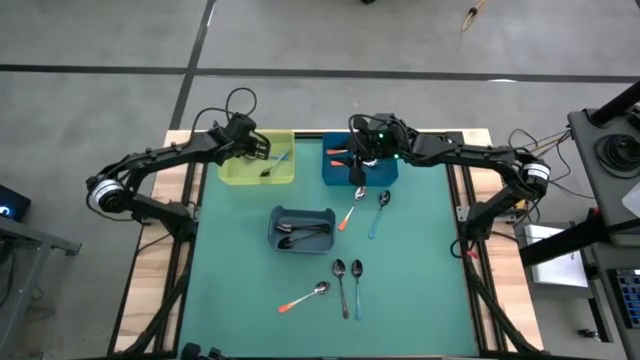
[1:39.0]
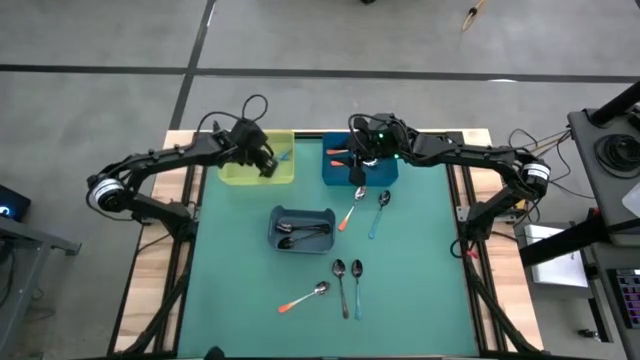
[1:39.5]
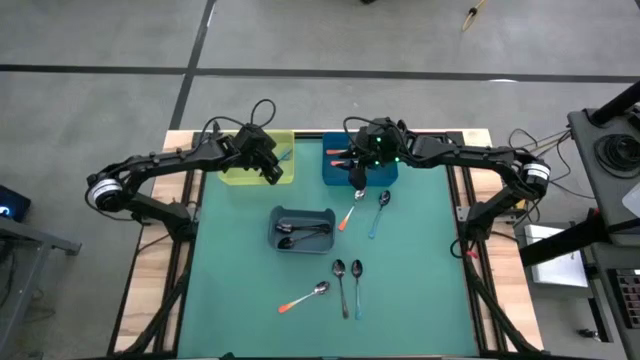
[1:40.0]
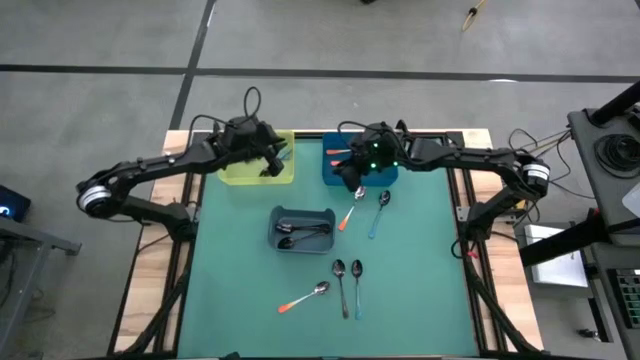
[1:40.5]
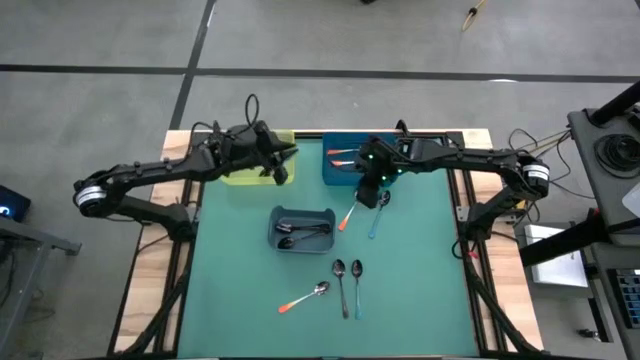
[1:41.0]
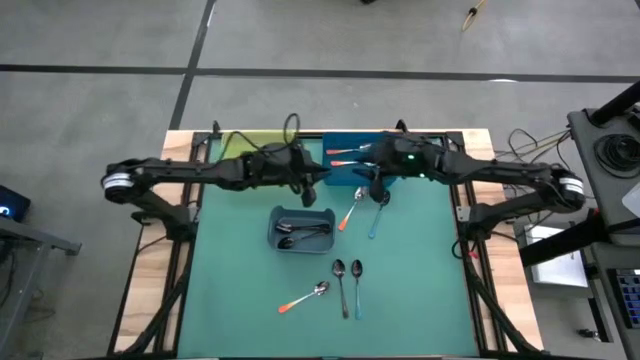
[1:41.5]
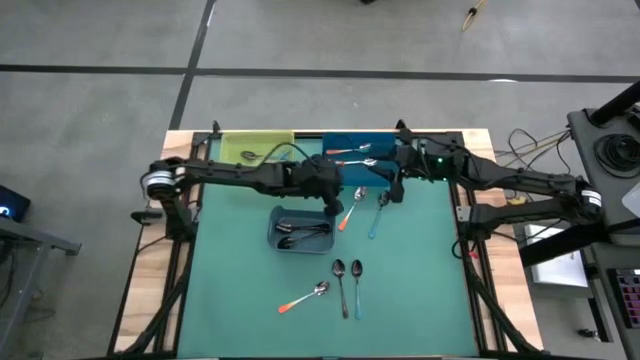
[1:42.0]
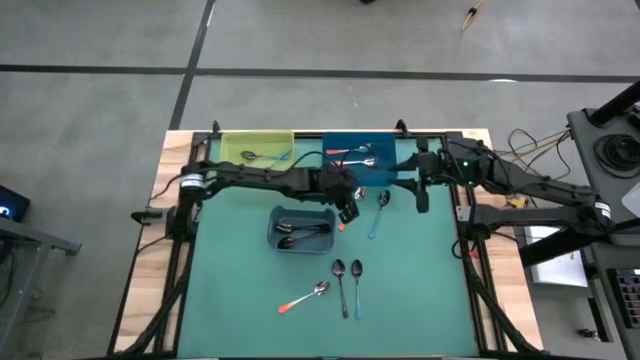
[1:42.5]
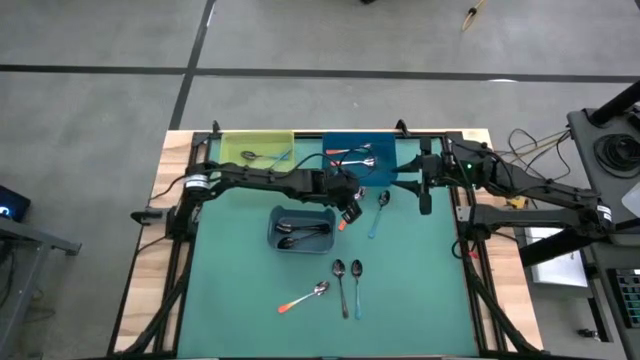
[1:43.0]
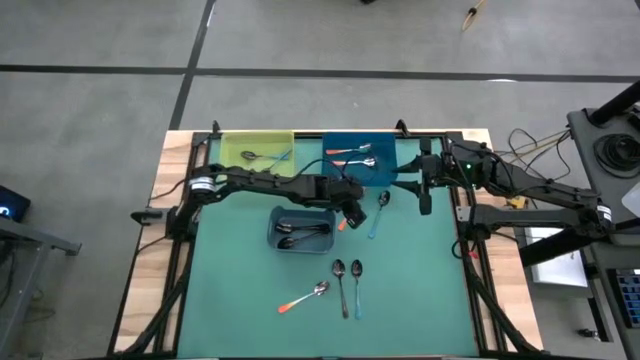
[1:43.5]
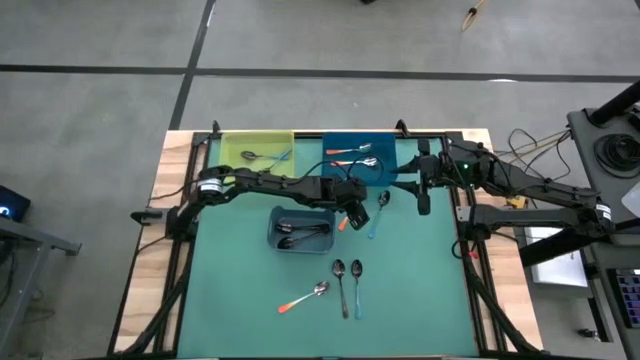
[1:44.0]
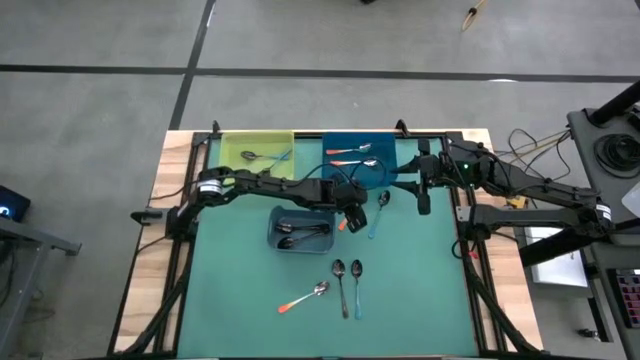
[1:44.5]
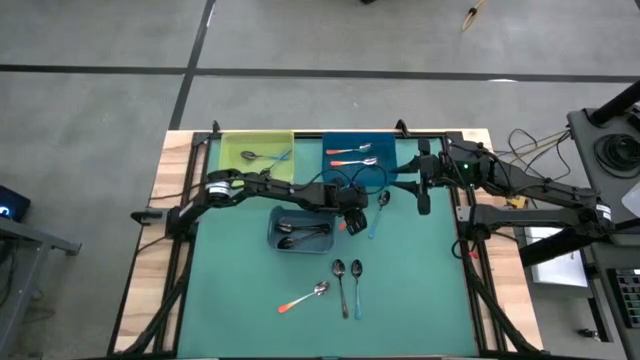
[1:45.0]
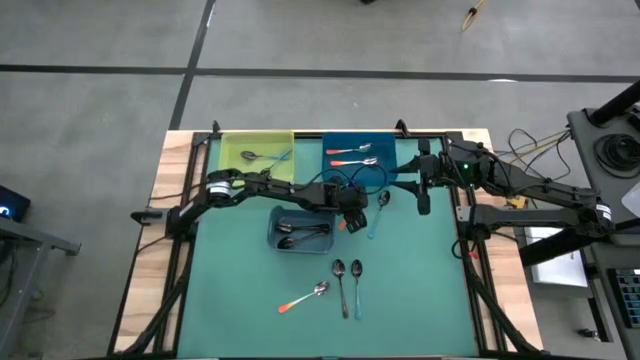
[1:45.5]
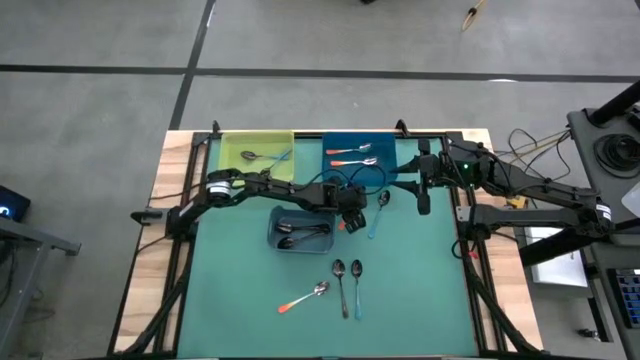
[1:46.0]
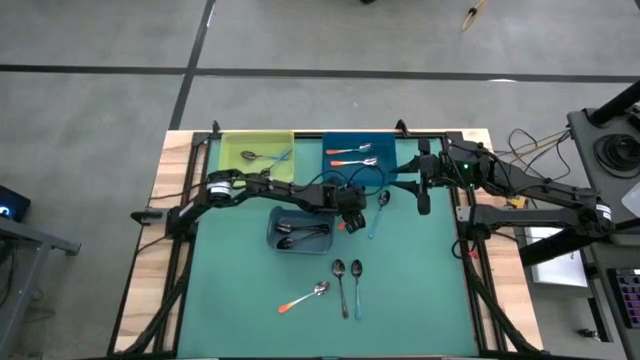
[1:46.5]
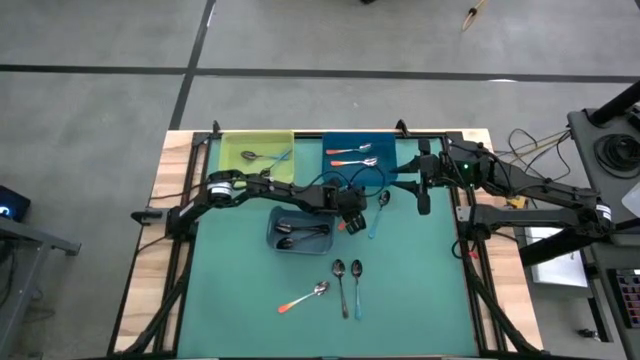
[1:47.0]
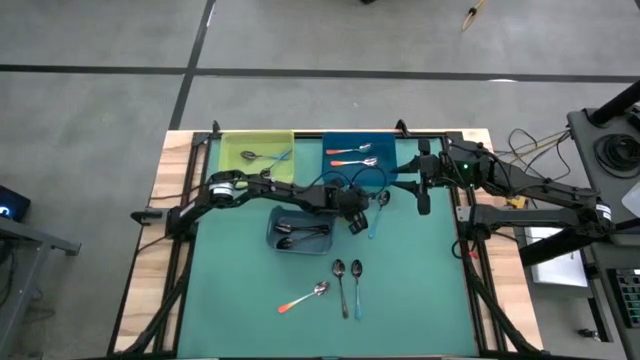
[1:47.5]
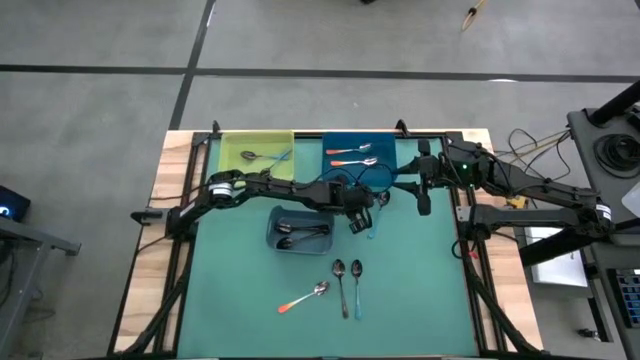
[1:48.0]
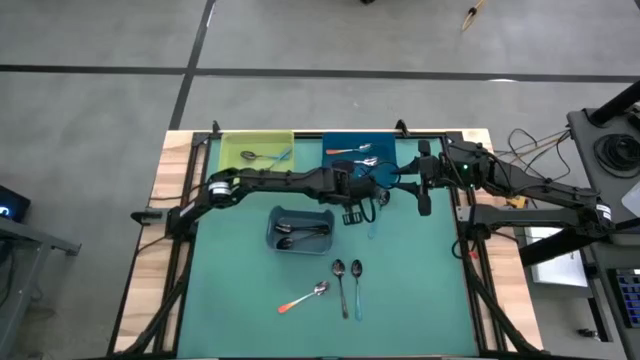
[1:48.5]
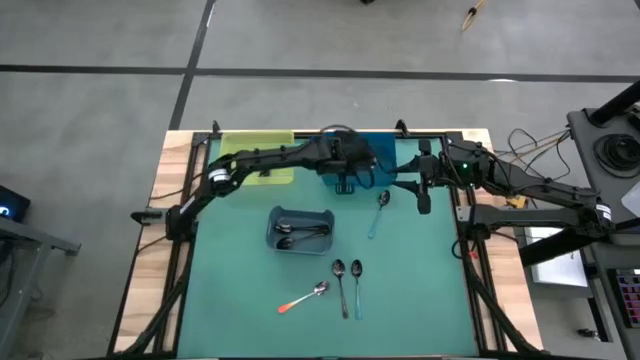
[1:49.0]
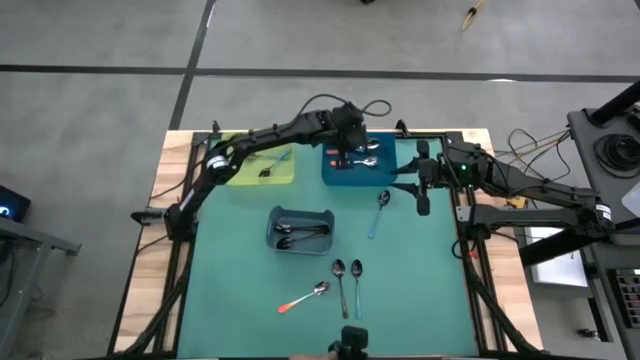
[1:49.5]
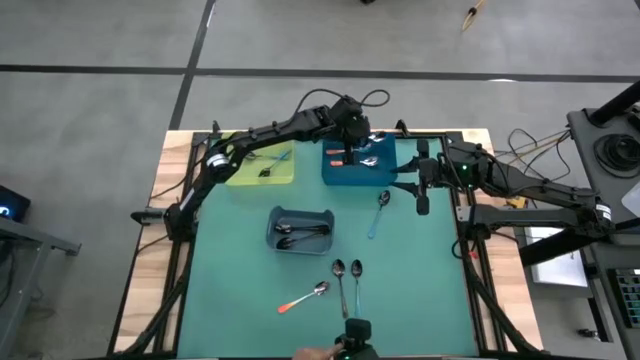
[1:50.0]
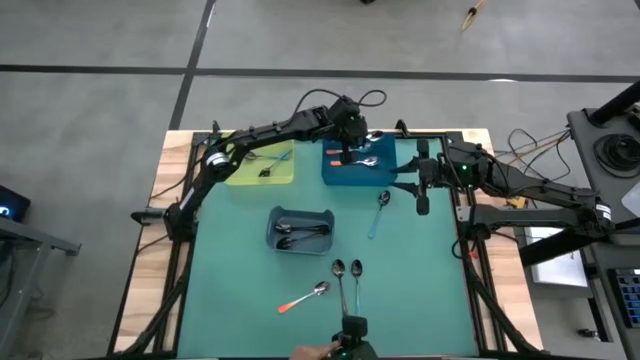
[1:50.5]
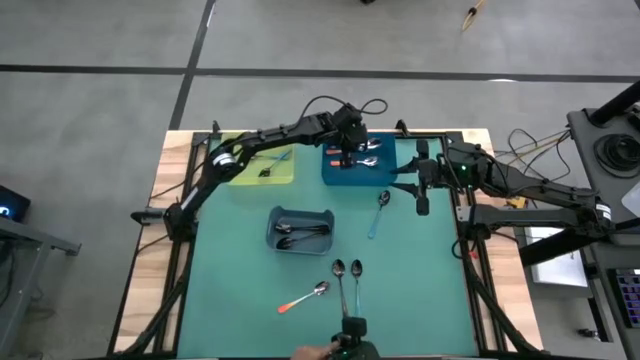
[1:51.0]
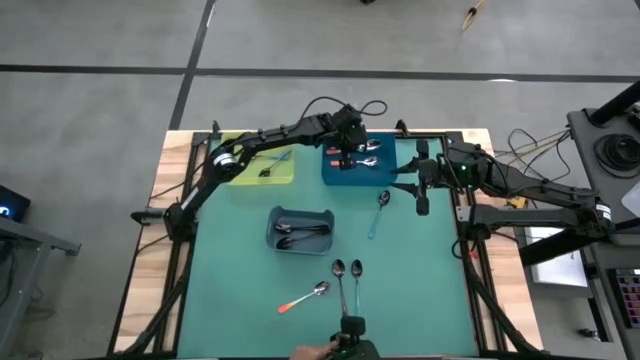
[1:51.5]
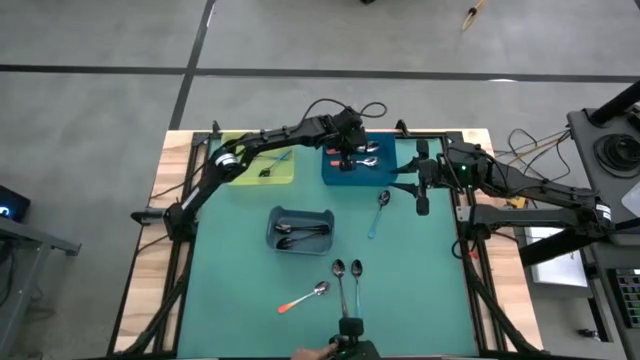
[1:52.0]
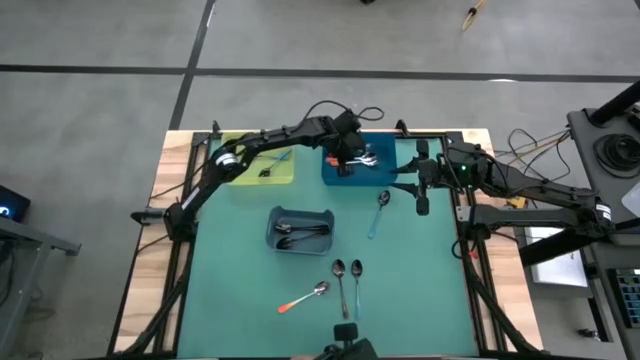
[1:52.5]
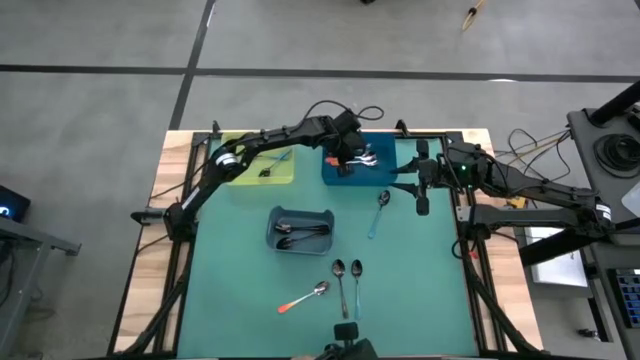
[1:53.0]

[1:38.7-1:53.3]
Task: Sort silverware by color (type)
Put the orange spoon into the blue bin

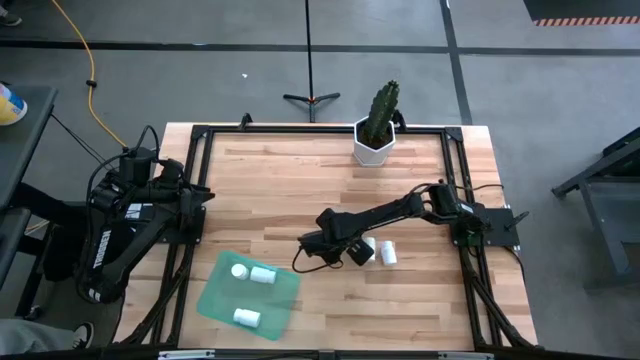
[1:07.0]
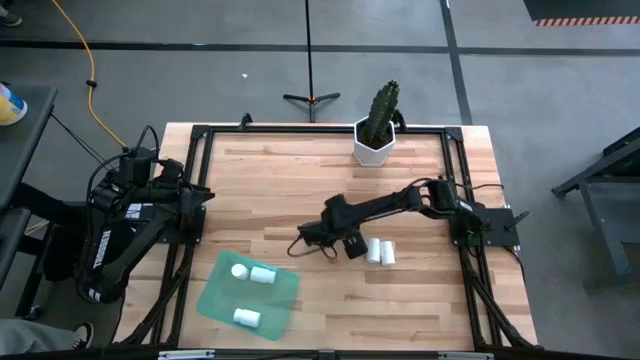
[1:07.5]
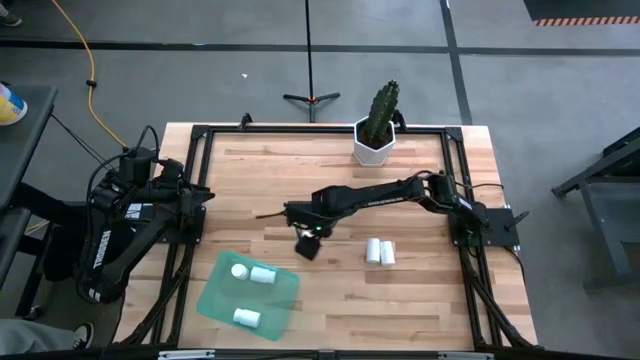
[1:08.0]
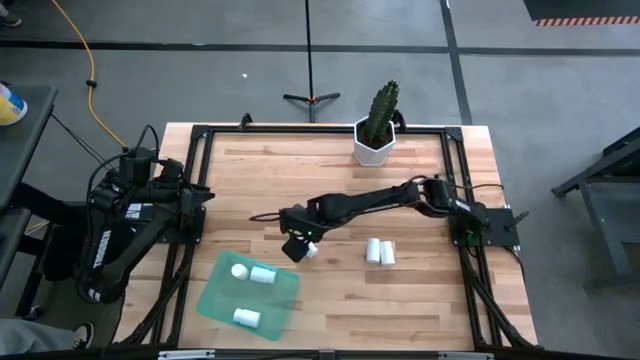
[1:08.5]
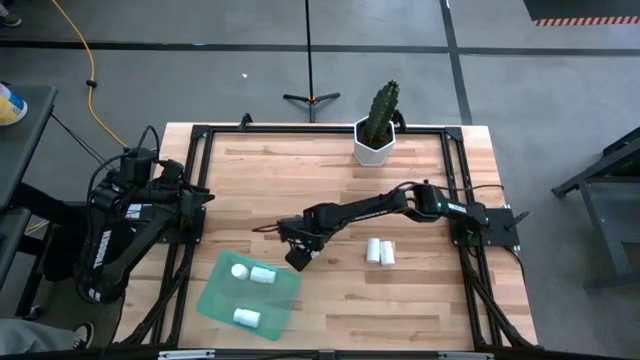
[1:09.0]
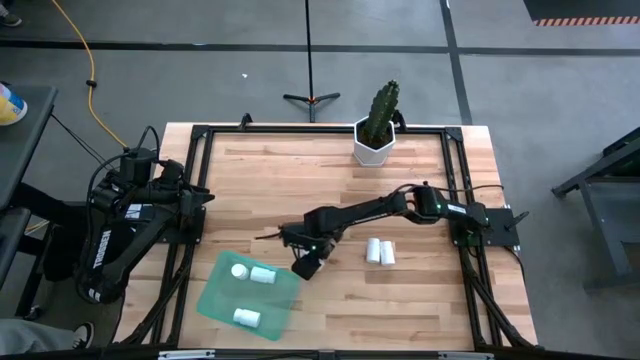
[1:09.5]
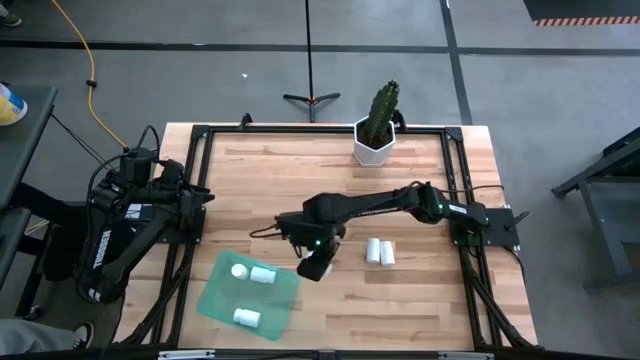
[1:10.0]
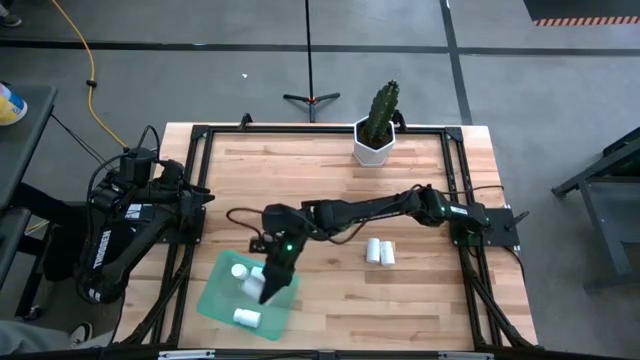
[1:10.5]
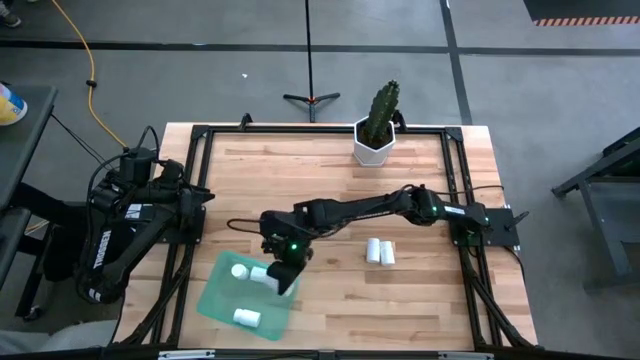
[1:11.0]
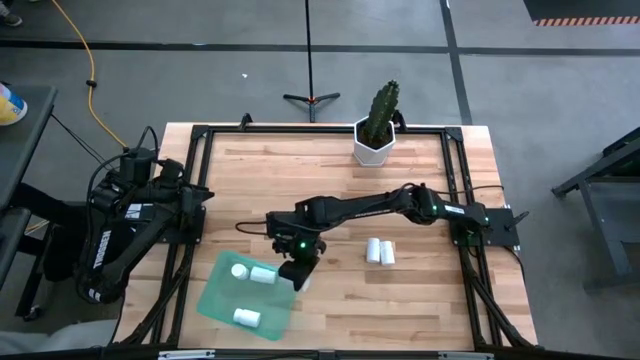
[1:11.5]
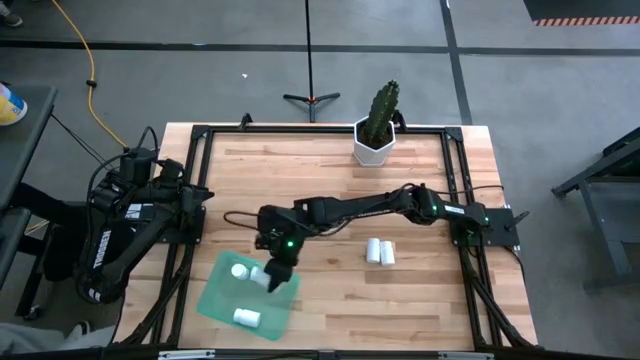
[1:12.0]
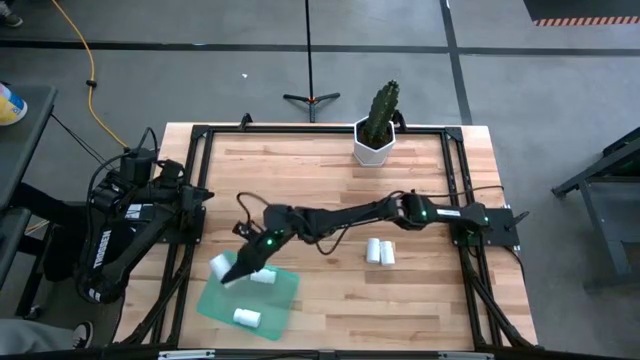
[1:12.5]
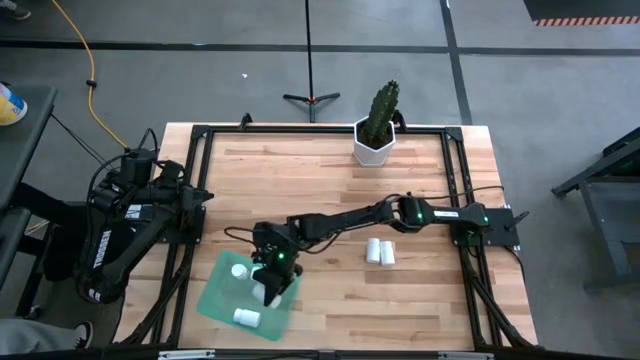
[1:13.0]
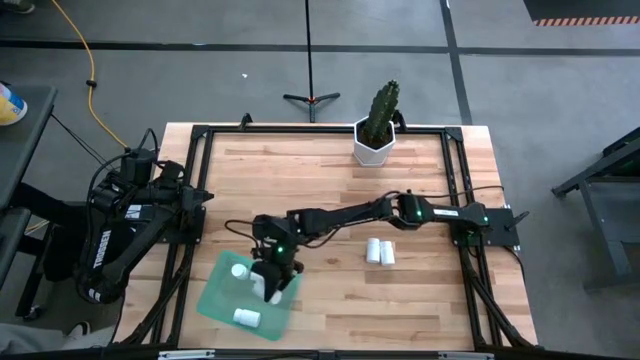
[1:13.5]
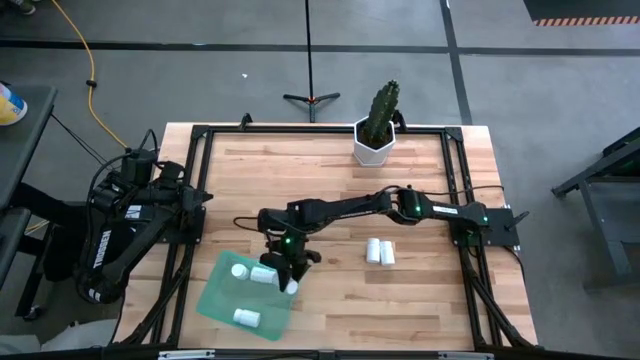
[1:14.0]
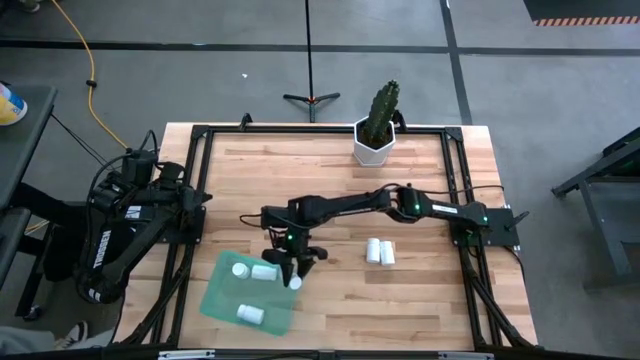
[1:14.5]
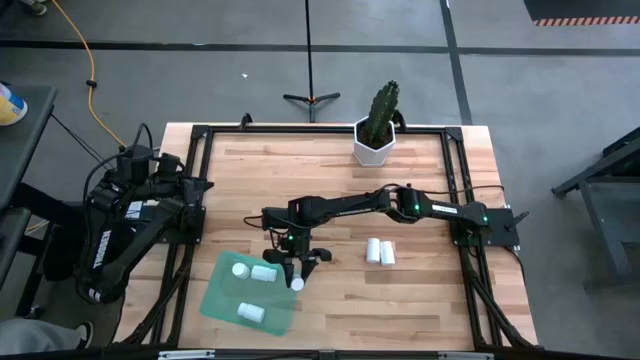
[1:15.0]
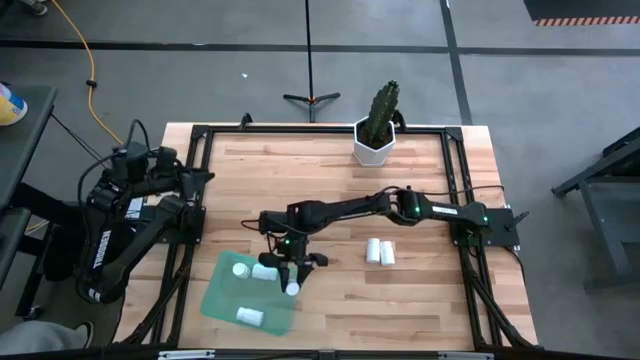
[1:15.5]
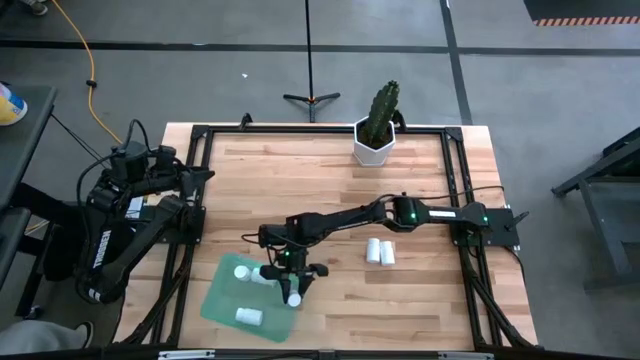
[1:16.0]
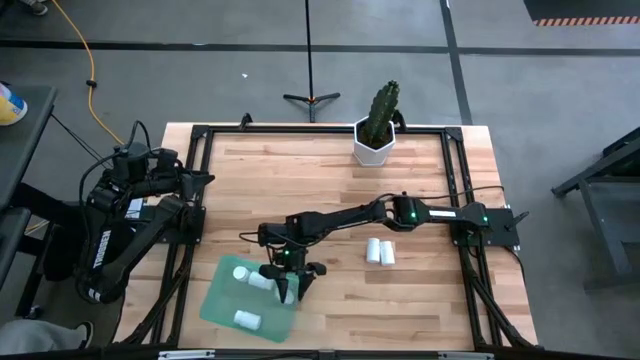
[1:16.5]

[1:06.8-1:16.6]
Task: Pick and place pill bottles into a basket
Put the white pill bottle into the green bin
